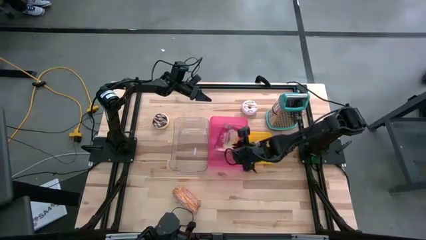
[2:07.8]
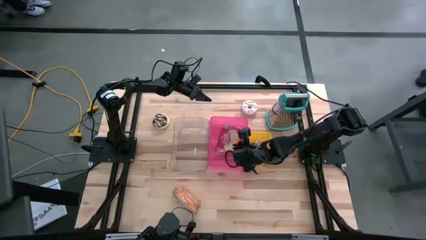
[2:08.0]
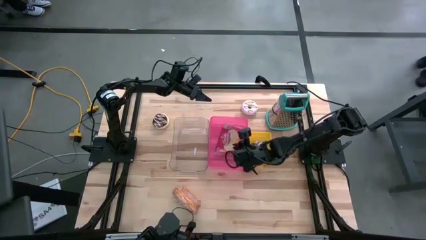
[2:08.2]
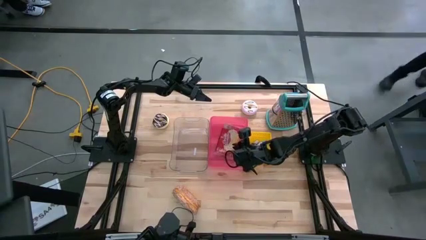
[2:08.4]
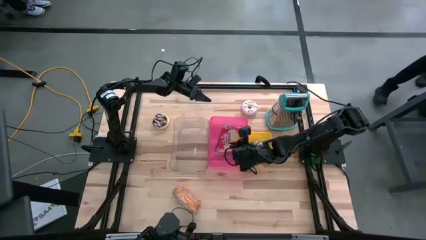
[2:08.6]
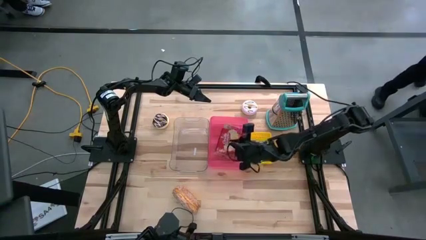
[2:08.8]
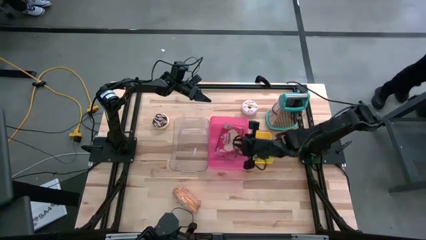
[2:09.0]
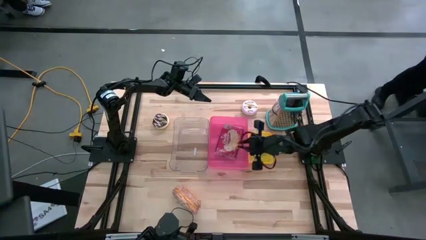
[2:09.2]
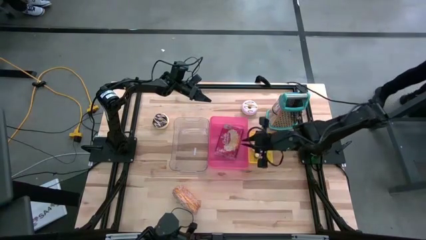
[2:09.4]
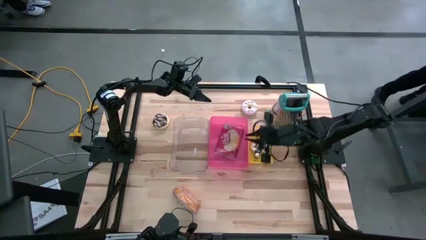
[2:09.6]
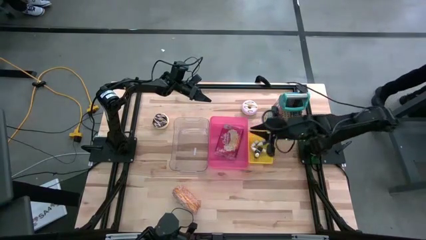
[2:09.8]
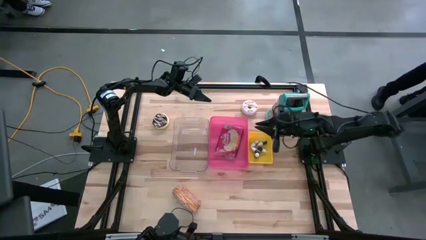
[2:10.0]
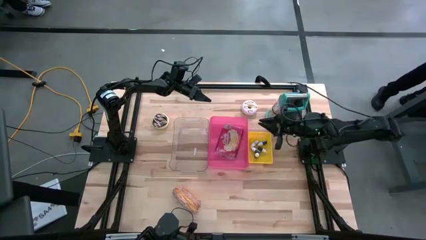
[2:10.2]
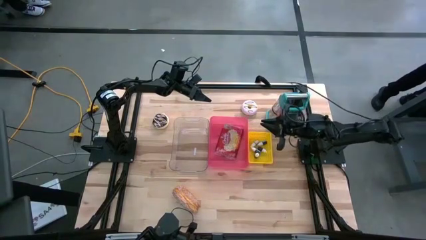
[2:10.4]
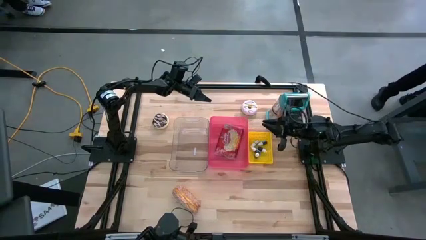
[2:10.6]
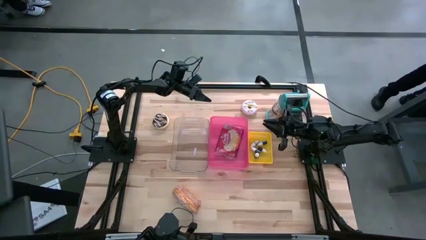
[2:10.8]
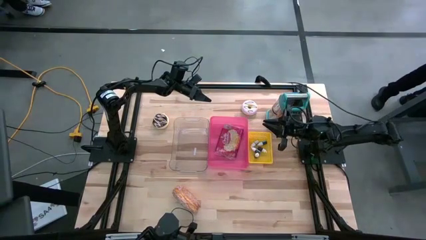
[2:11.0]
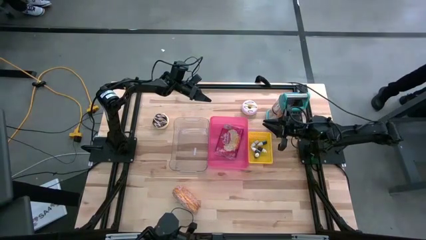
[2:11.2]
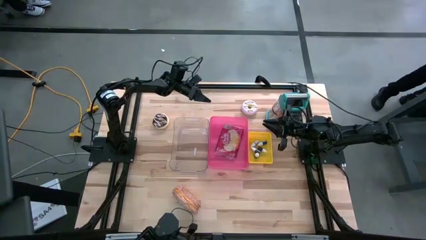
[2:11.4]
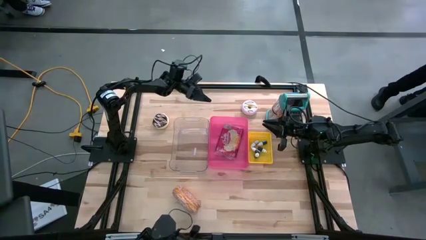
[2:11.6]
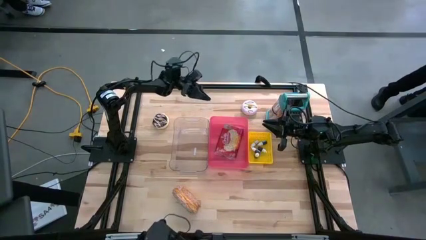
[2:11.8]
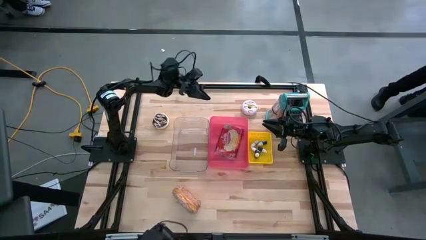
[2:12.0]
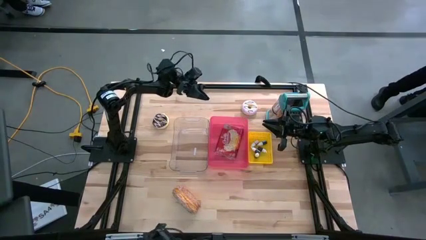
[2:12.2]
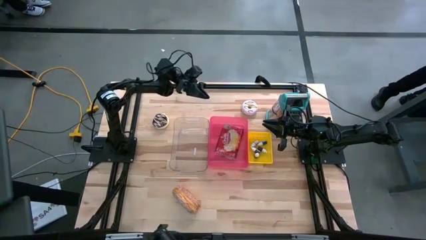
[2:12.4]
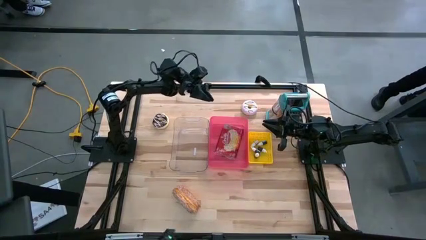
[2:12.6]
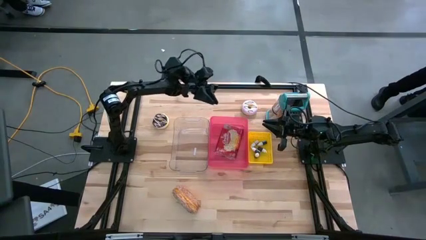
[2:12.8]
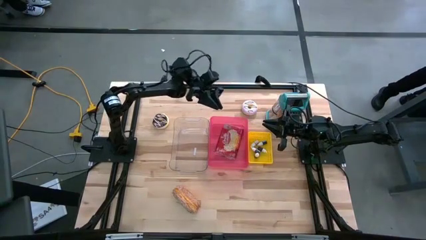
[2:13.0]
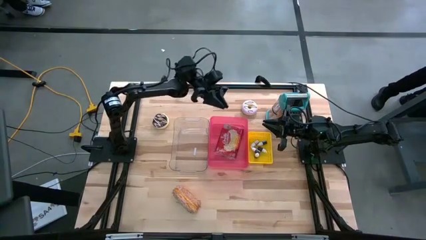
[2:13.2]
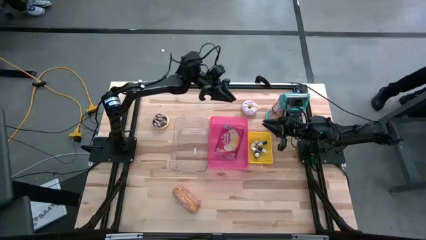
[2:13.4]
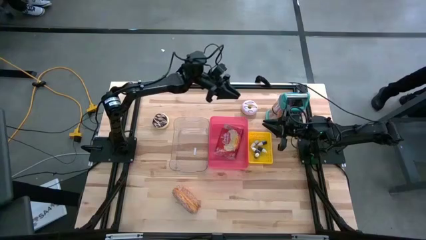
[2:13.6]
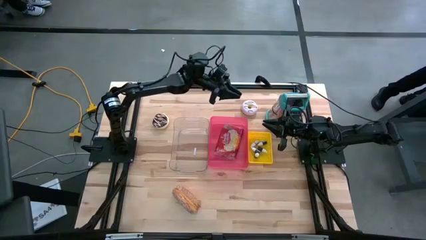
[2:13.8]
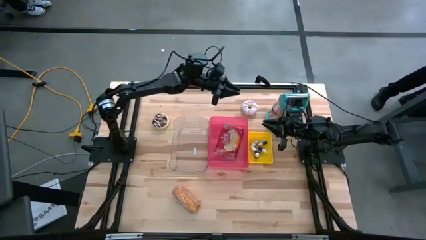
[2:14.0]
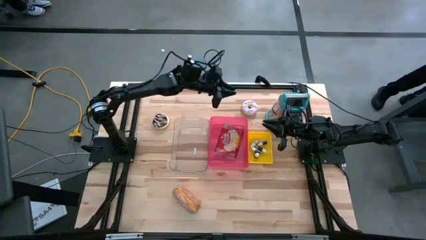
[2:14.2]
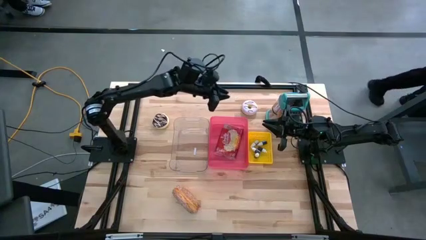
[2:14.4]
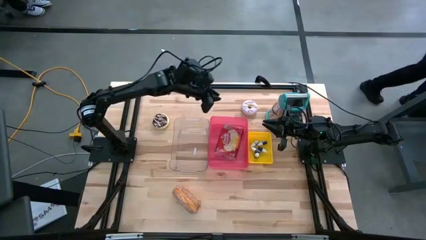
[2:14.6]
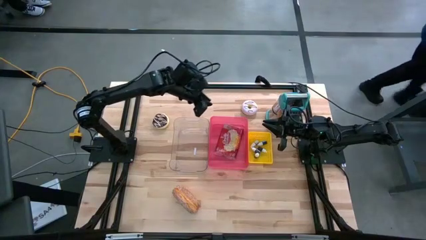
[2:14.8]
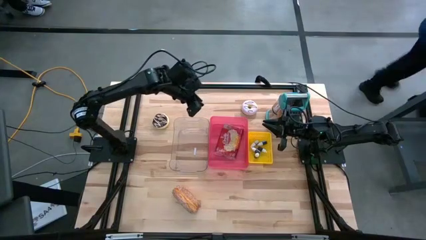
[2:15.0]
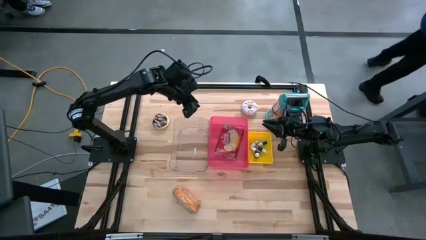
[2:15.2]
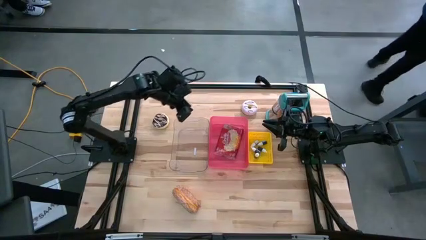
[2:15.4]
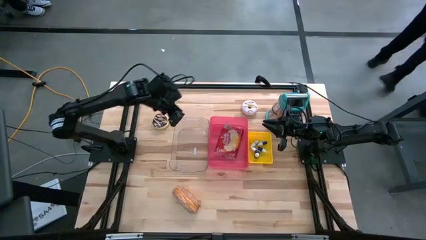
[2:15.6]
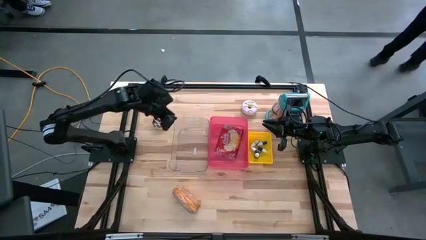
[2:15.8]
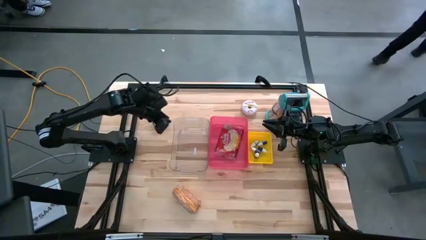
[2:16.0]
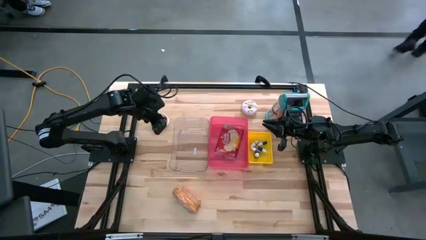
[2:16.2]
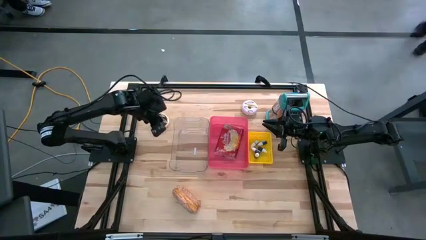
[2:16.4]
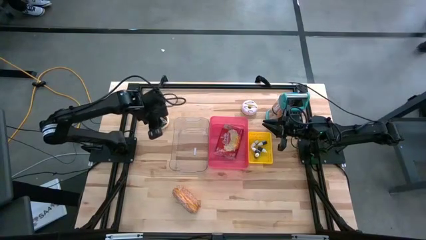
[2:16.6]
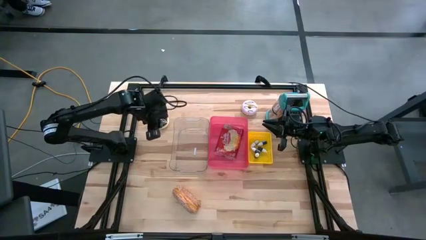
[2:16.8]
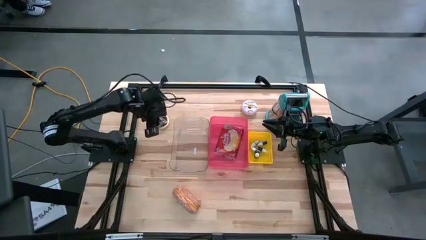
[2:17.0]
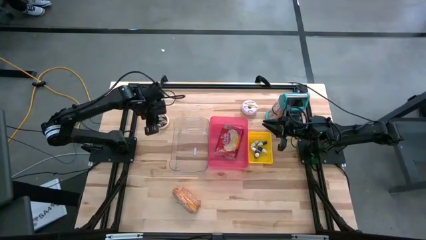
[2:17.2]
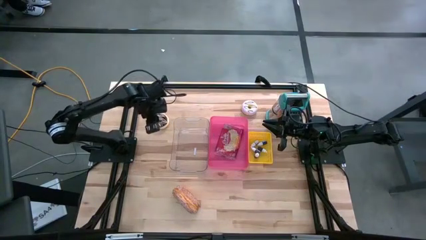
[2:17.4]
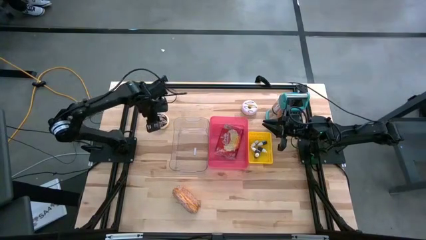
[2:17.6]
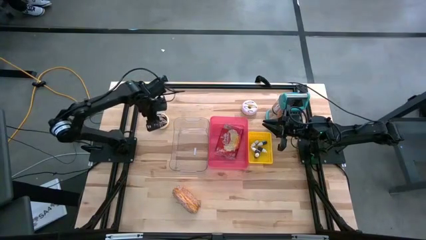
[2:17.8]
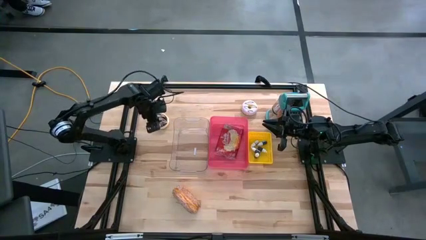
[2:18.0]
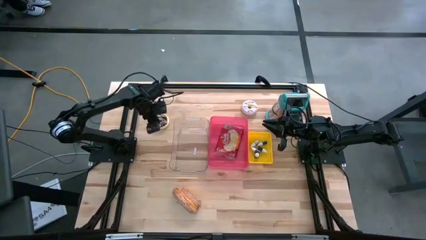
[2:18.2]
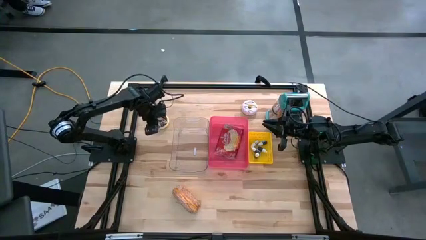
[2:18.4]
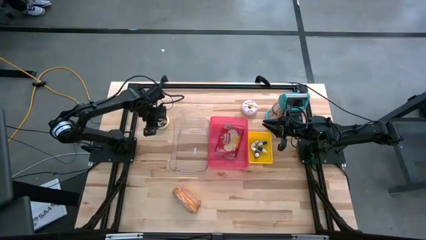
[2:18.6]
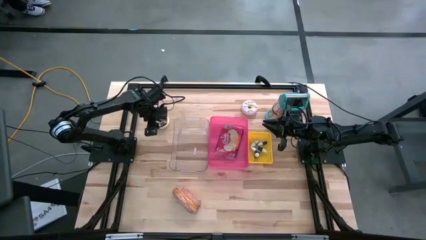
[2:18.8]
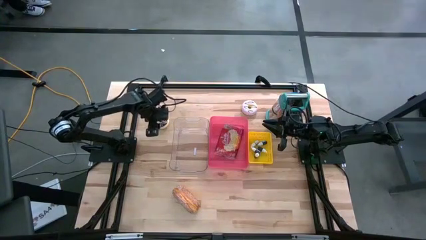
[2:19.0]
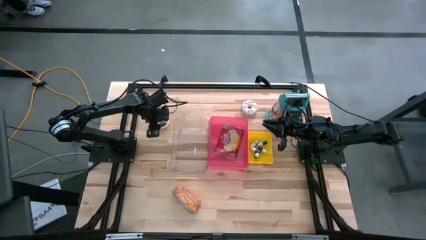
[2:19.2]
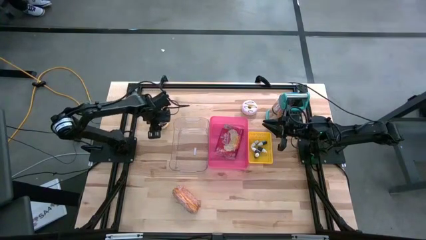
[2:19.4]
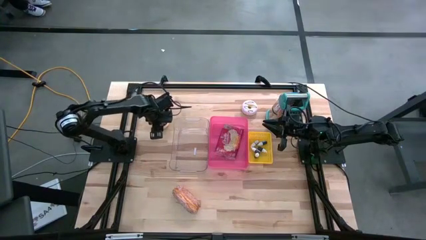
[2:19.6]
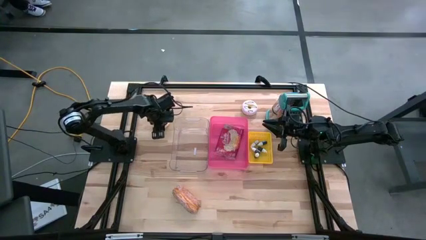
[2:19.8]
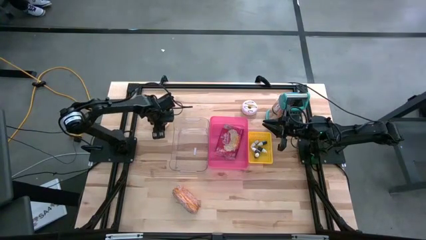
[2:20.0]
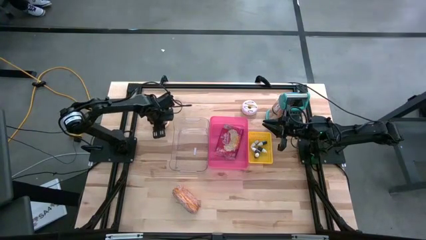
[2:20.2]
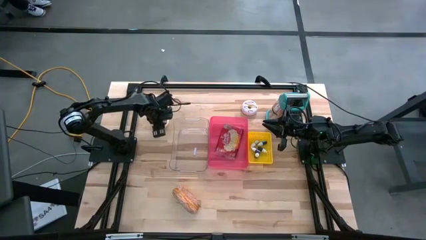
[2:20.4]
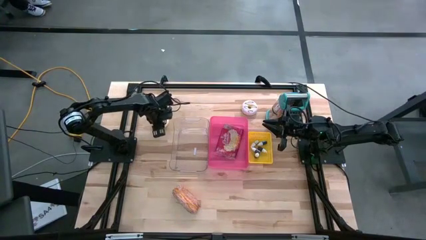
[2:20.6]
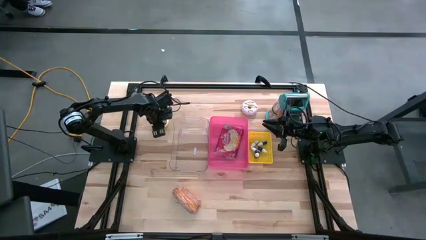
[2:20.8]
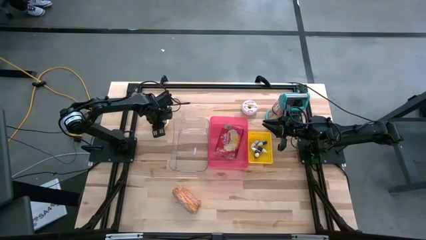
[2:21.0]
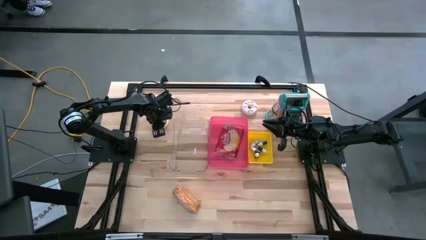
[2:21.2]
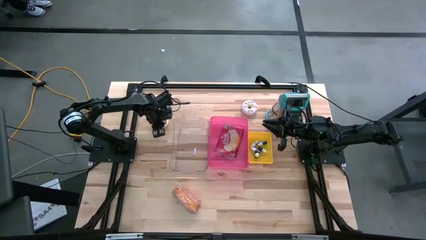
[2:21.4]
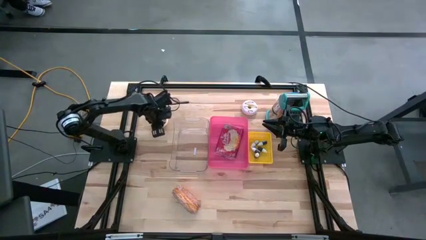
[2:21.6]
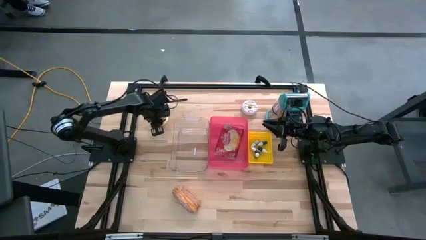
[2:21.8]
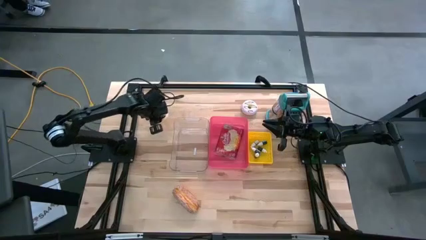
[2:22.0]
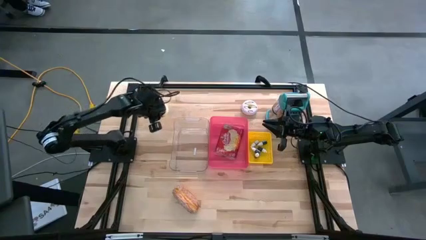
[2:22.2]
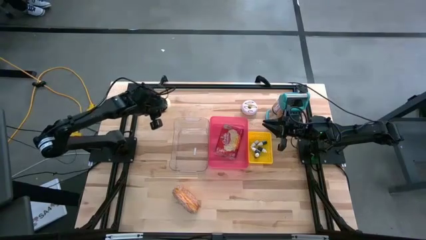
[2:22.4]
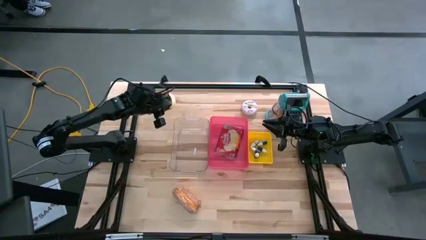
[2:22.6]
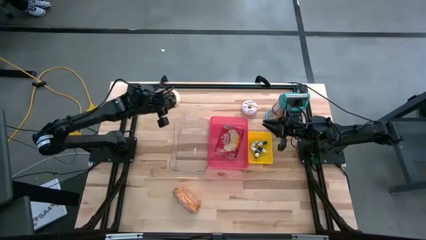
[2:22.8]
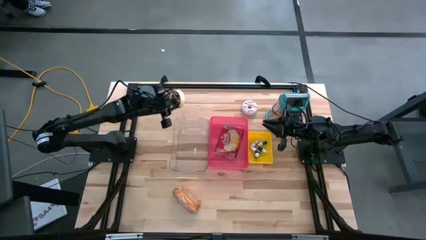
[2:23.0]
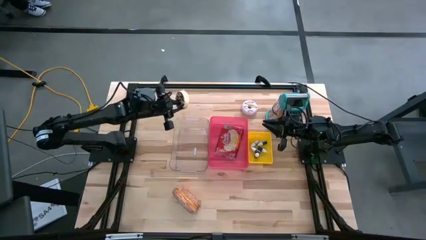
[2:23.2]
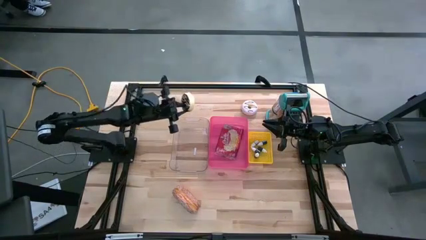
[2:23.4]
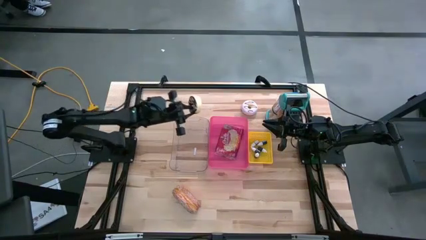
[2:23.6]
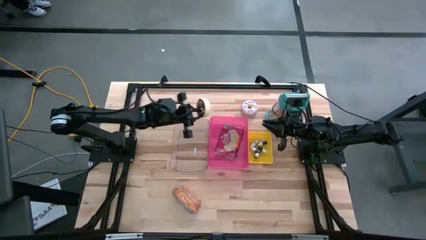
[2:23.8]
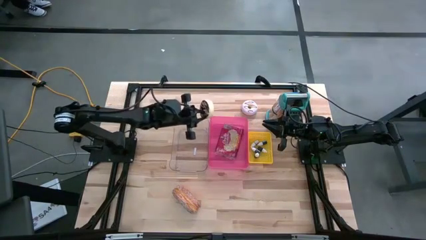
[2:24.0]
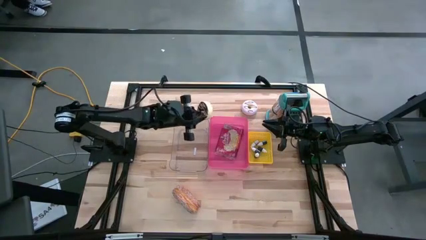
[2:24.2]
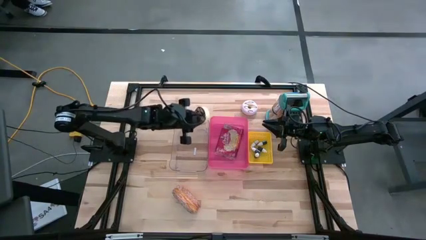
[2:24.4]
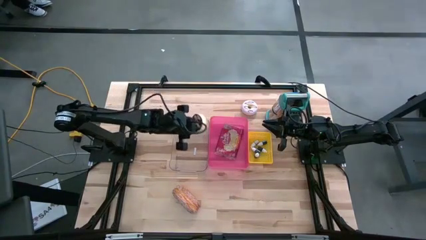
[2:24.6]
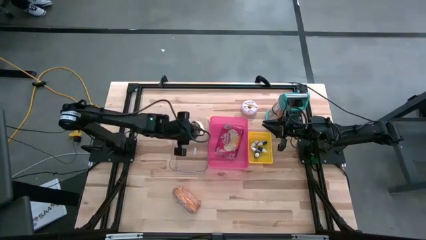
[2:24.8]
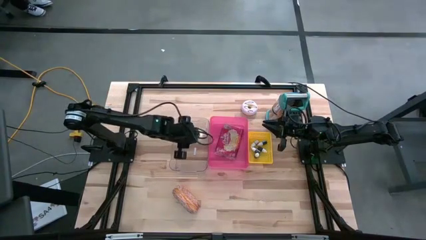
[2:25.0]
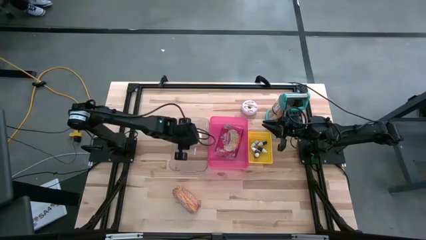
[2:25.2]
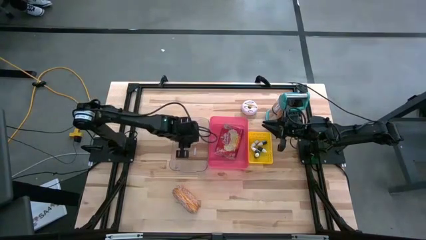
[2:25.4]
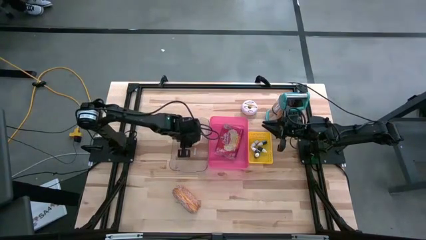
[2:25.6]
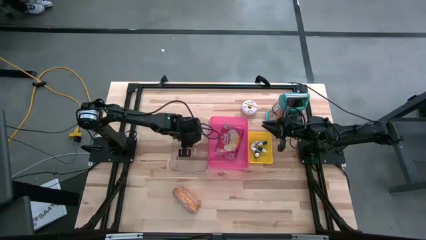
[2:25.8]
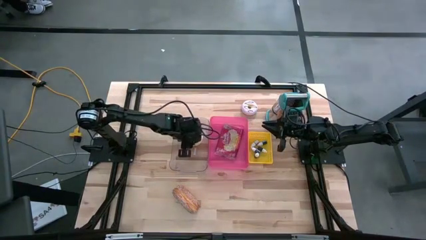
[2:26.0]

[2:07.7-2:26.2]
Put the black donut into the transparent bin
